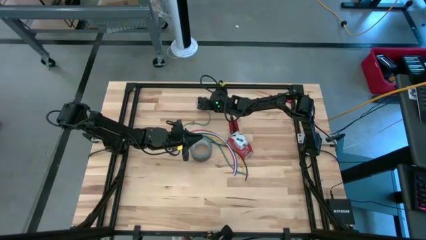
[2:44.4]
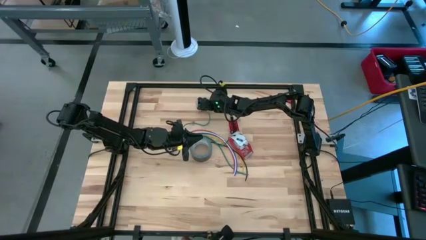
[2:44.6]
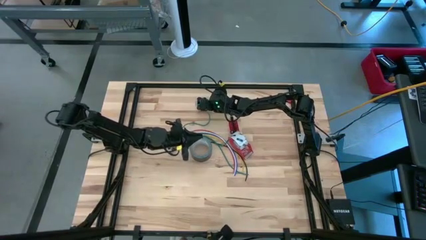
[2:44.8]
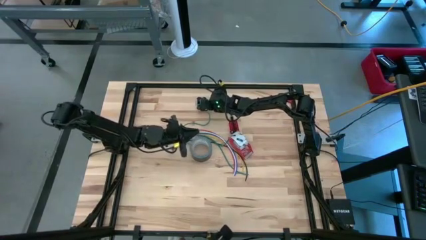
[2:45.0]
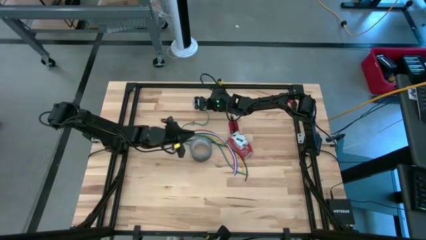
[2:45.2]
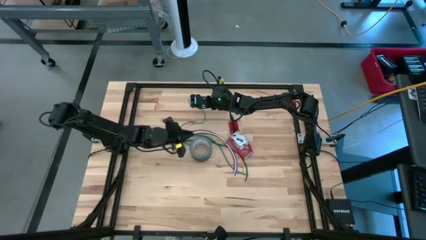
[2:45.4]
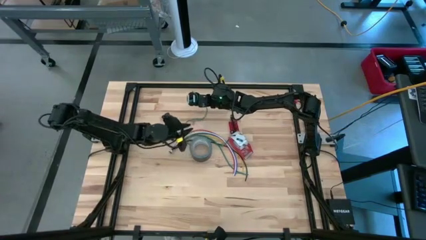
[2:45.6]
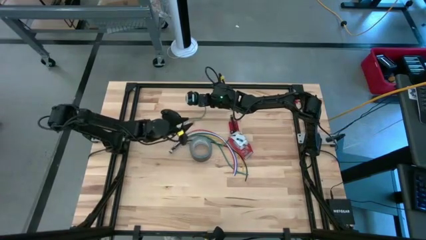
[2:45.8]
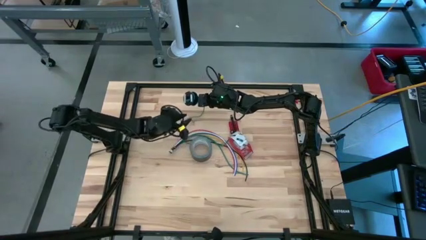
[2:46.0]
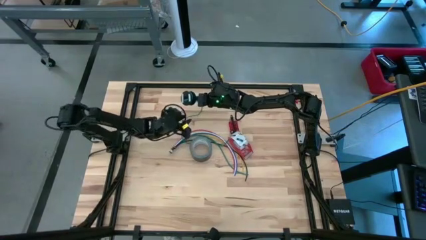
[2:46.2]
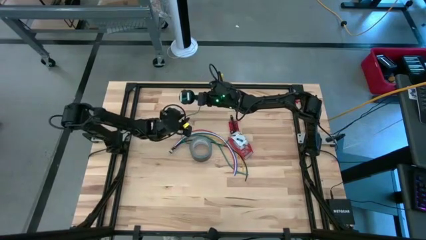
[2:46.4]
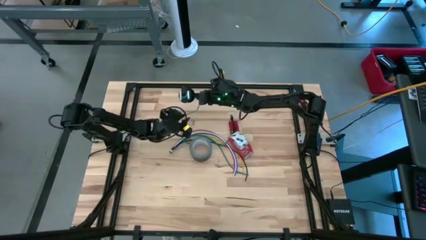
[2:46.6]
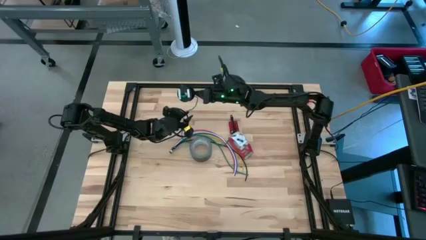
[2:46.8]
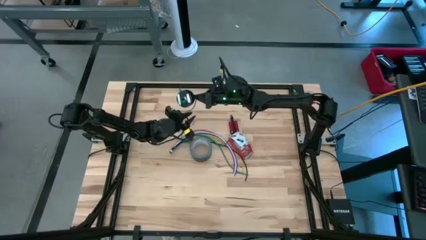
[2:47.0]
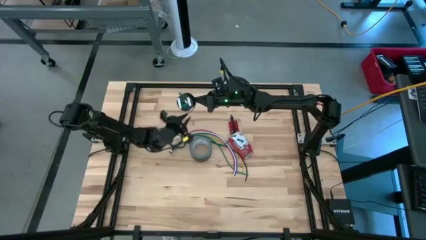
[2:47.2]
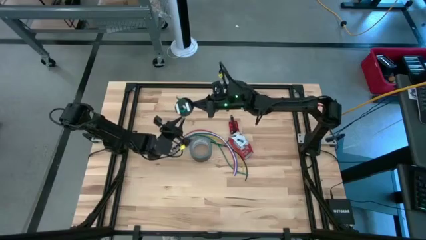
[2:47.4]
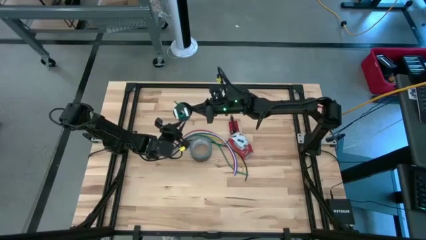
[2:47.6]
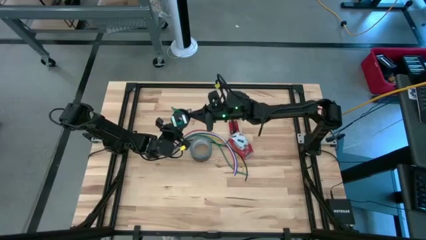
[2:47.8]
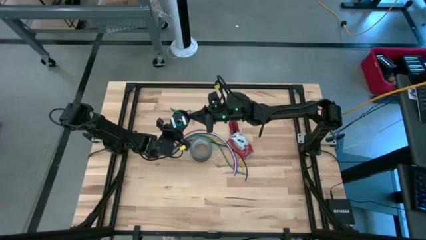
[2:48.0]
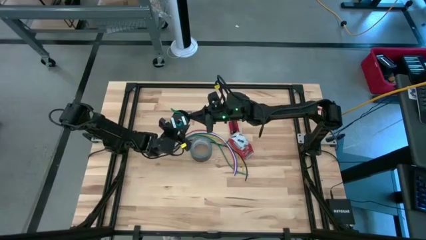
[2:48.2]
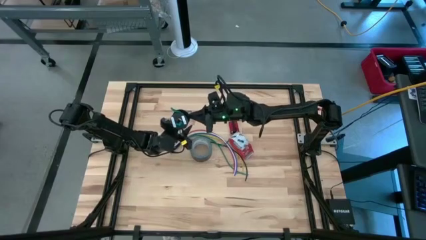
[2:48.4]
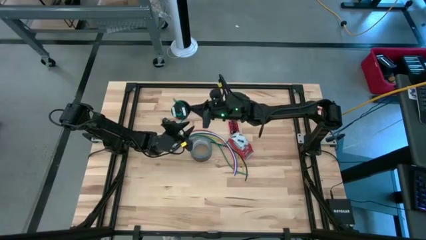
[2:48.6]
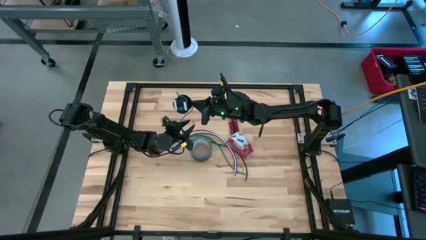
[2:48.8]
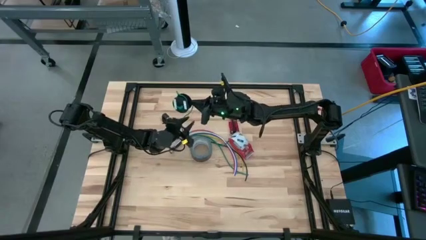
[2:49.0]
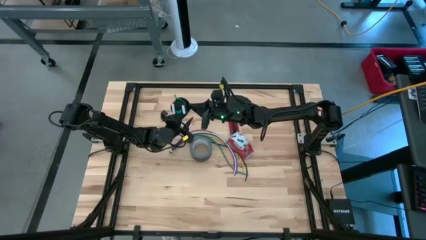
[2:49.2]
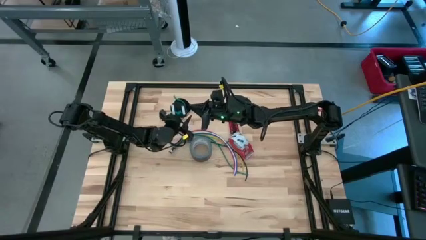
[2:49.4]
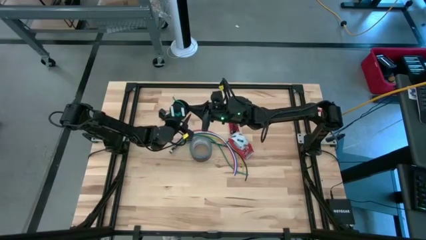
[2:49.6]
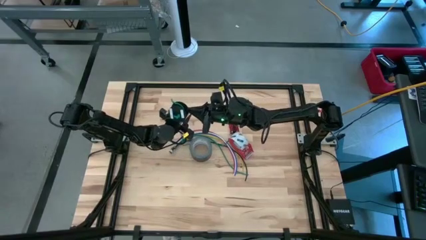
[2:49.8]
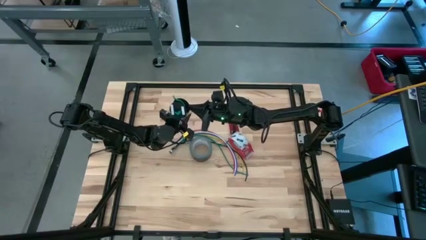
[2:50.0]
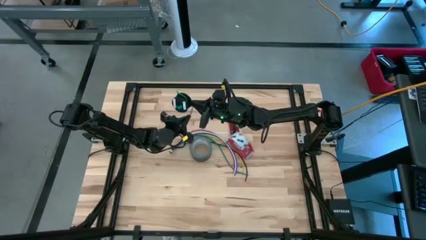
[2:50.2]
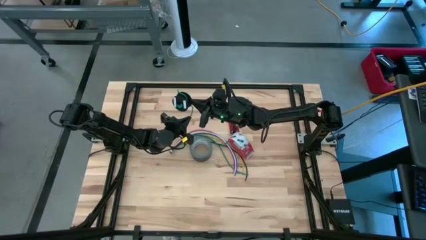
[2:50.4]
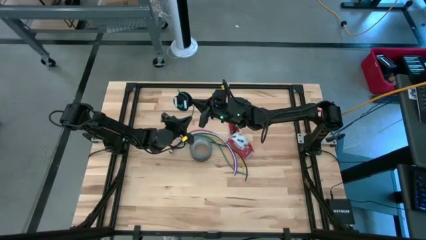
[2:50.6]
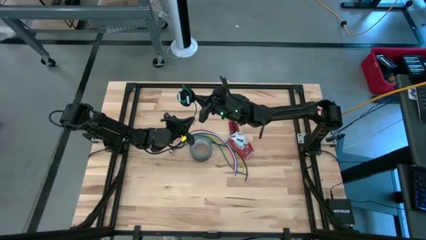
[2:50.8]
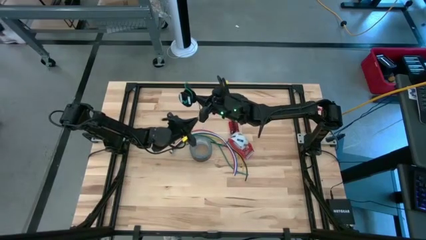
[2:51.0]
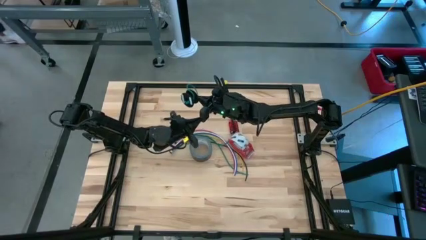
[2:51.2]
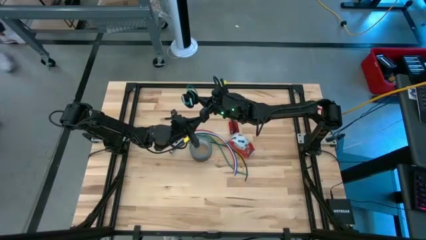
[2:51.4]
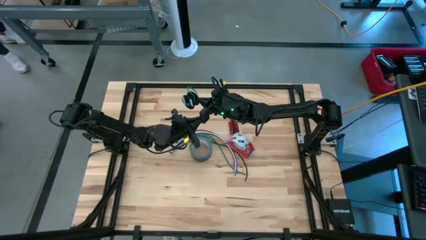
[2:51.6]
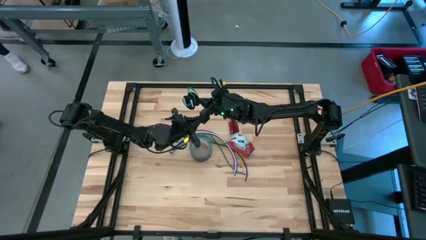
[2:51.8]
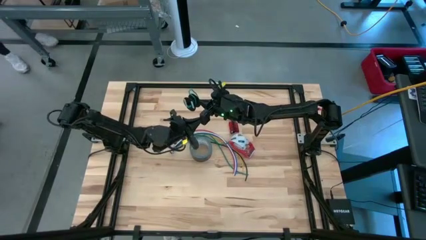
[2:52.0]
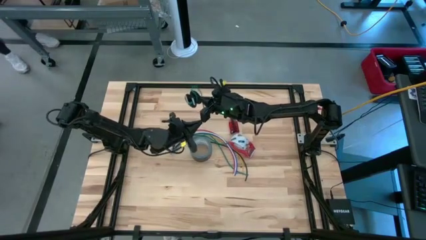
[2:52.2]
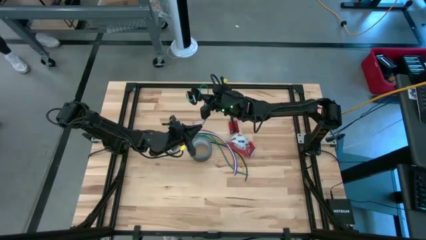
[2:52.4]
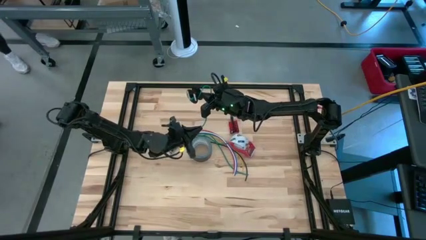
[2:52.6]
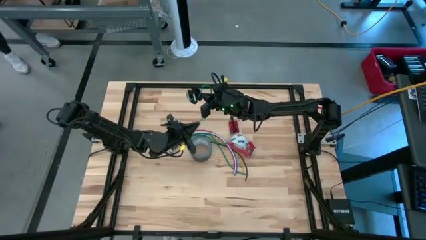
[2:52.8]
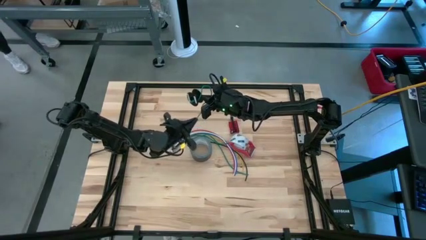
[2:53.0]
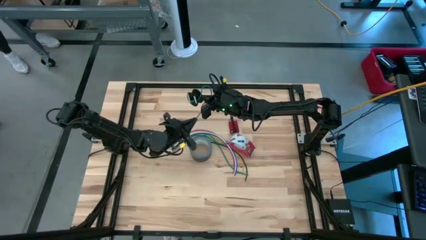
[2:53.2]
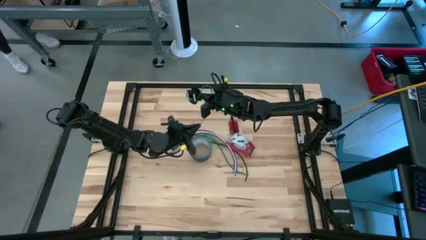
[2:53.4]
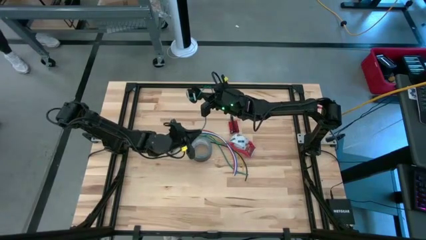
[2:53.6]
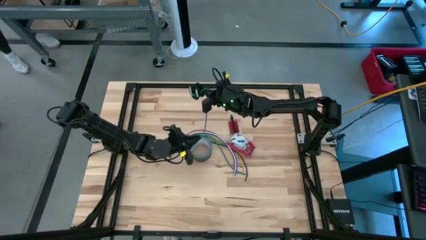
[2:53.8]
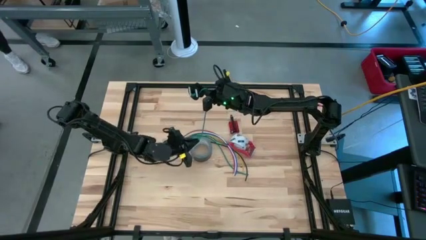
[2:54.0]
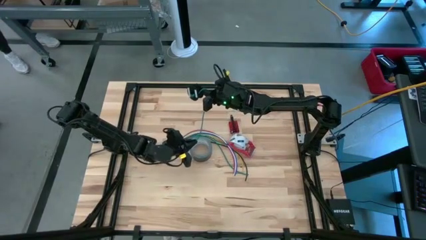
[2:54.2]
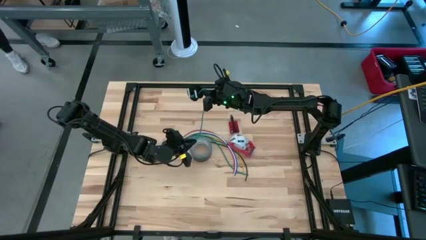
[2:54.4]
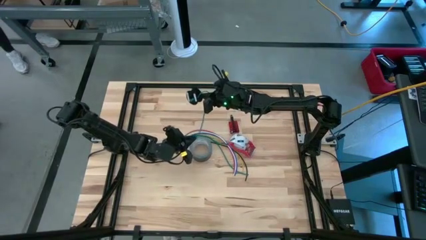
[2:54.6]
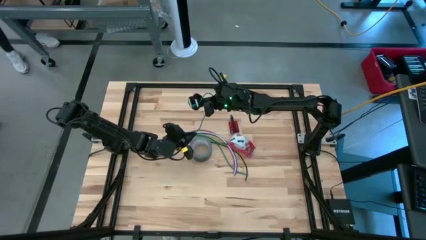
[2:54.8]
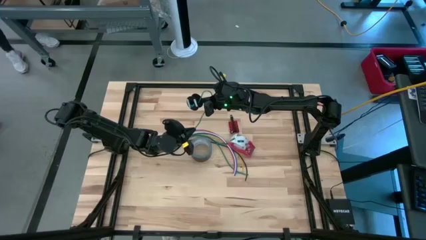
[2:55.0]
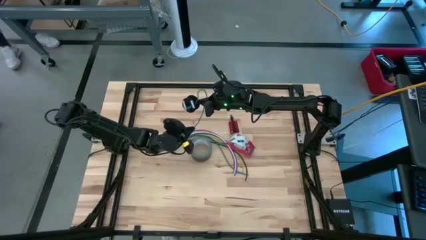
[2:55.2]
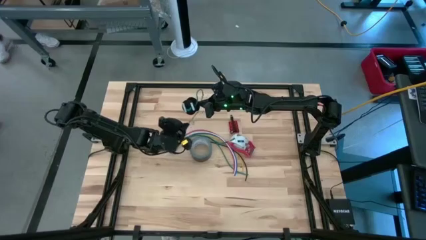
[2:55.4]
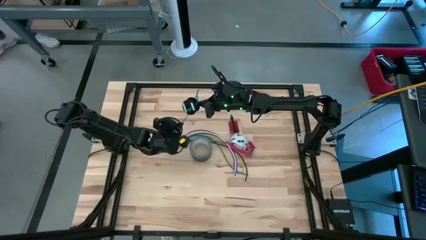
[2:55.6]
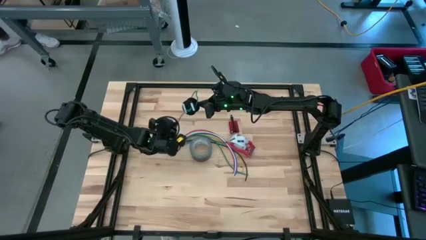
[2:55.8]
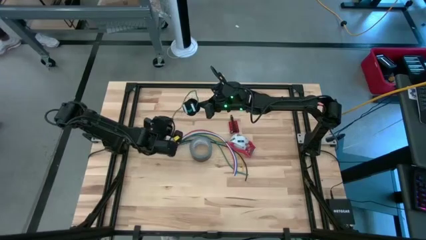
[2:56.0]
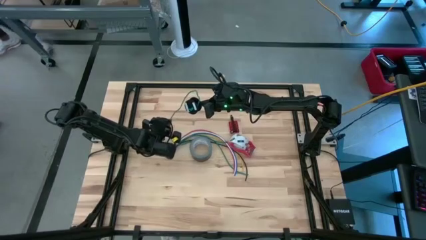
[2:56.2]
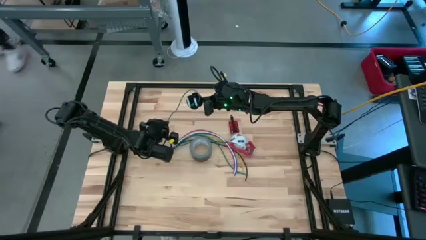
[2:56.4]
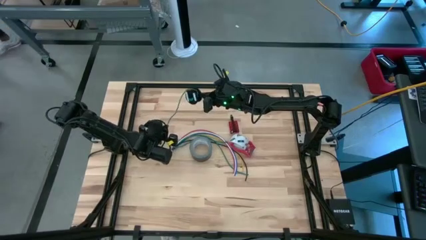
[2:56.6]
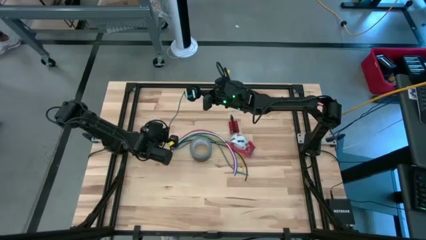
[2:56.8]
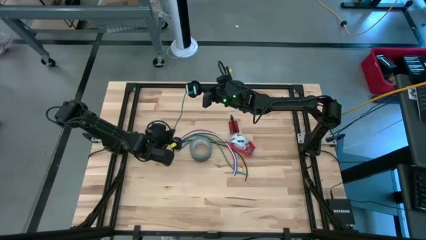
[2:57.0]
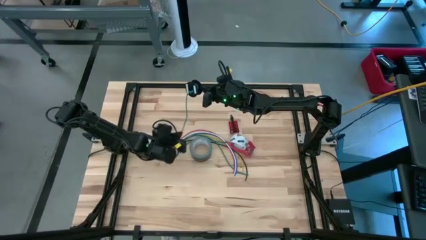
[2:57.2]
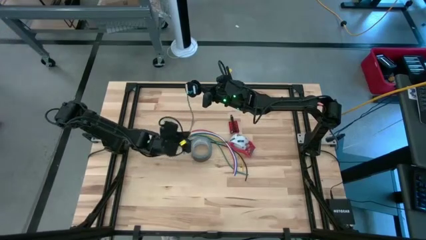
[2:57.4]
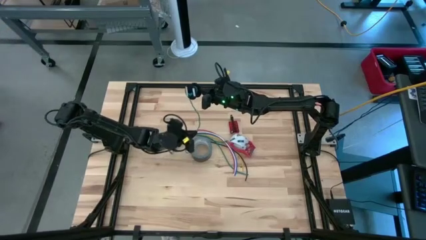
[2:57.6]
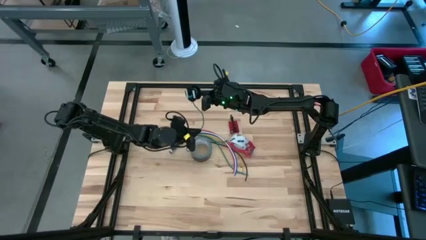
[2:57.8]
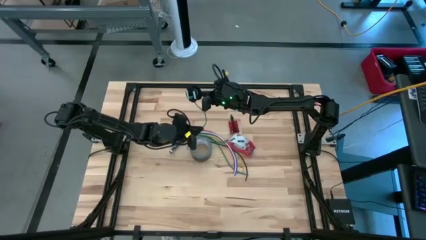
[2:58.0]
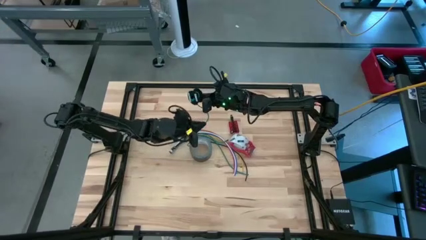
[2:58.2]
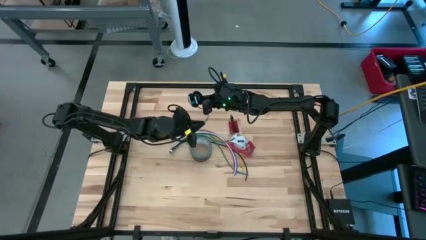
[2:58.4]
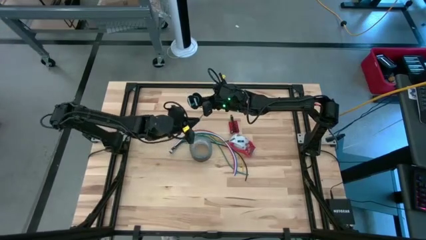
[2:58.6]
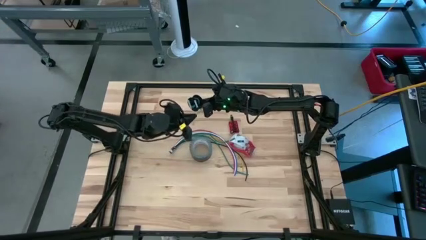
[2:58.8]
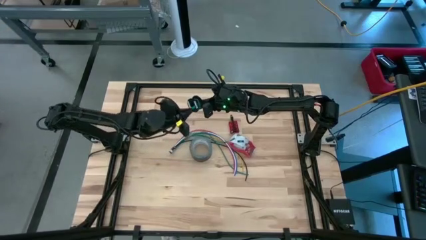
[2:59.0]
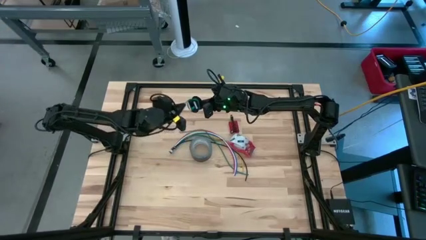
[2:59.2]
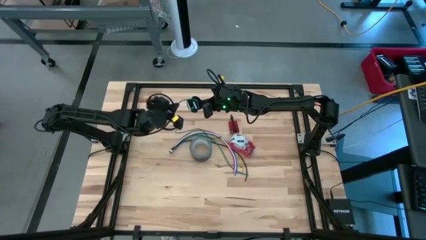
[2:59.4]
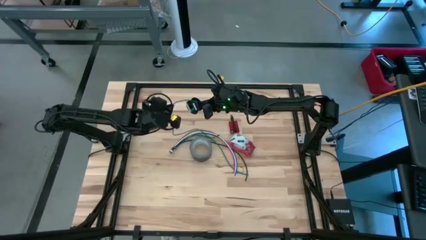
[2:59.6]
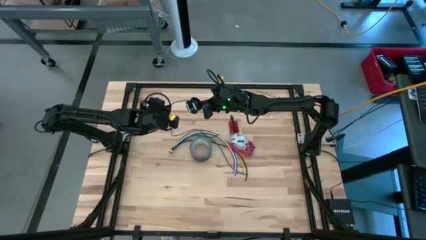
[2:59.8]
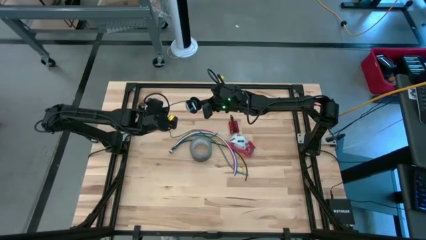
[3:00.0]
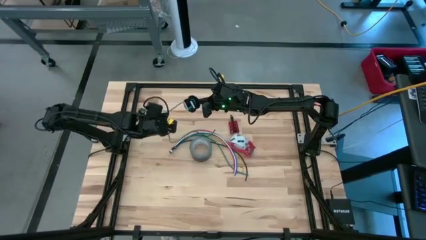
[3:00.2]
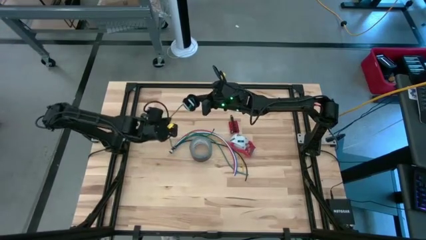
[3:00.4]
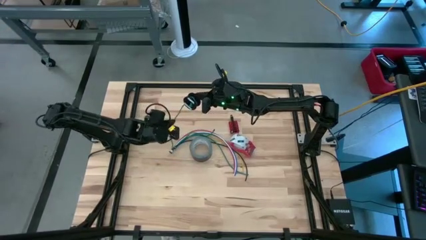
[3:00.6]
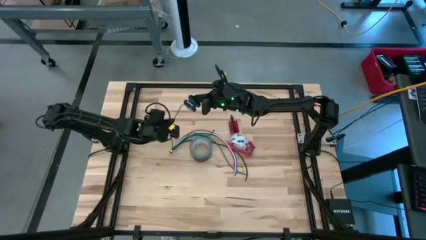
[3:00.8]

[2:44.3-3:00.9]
Task: Coil cords
Coil the green wire onto the black spool
